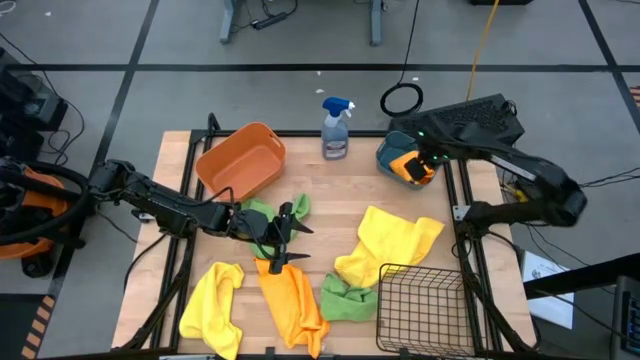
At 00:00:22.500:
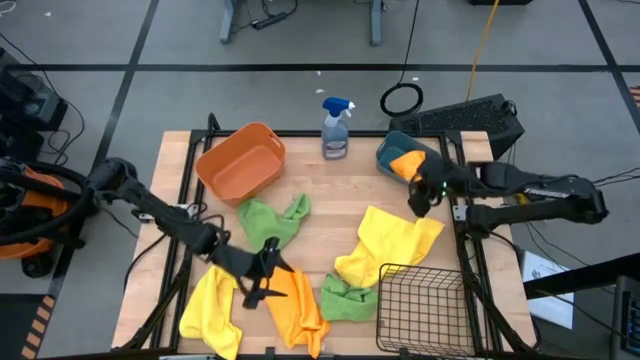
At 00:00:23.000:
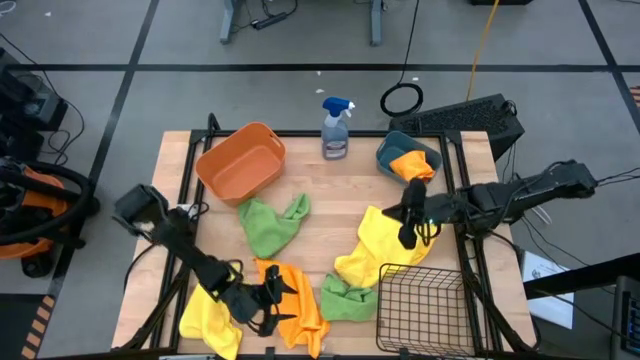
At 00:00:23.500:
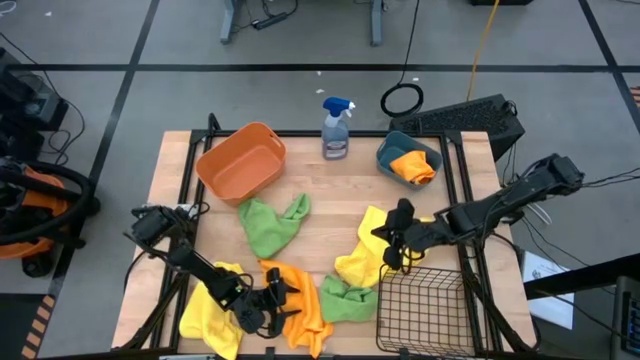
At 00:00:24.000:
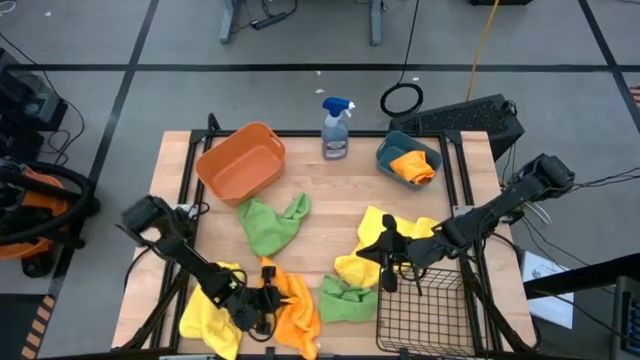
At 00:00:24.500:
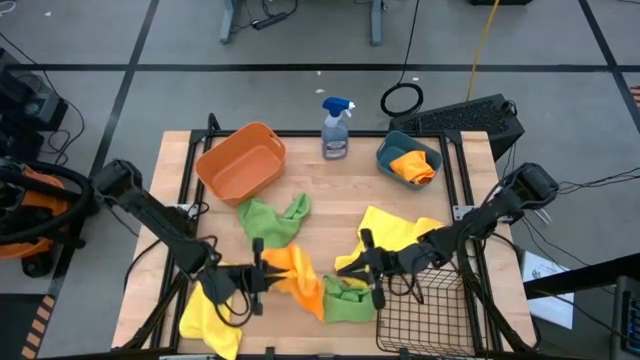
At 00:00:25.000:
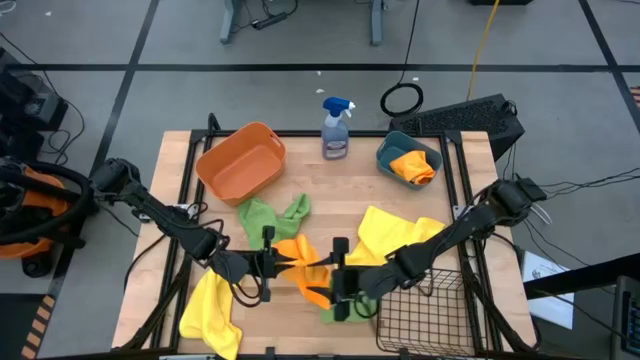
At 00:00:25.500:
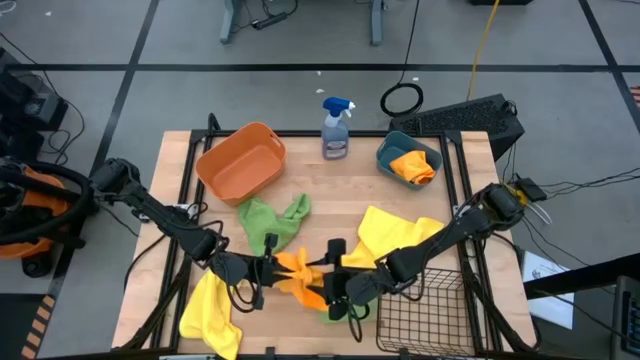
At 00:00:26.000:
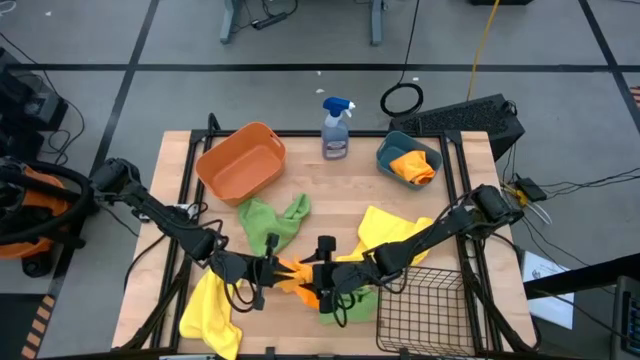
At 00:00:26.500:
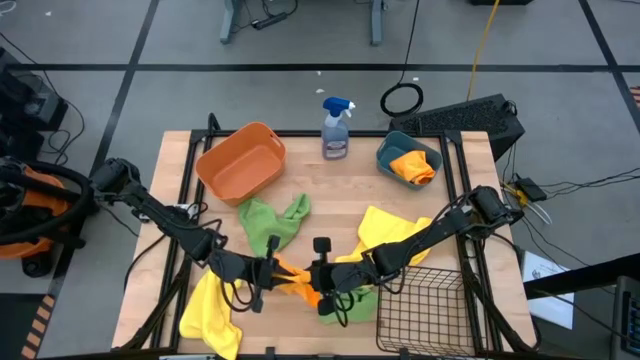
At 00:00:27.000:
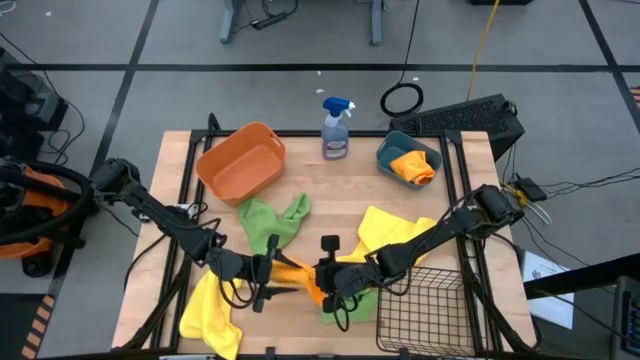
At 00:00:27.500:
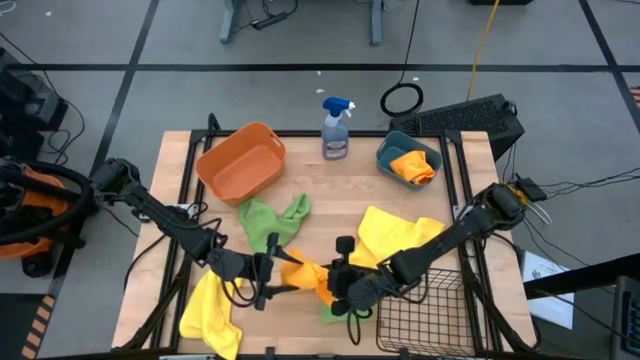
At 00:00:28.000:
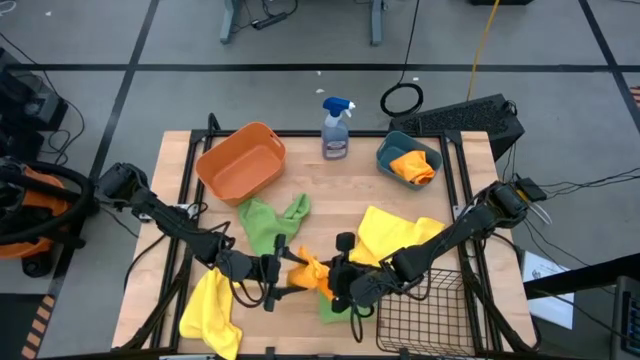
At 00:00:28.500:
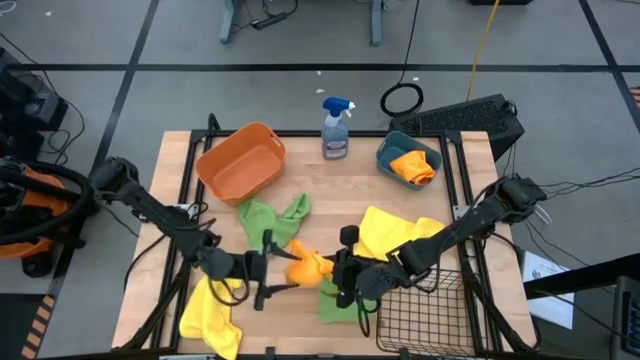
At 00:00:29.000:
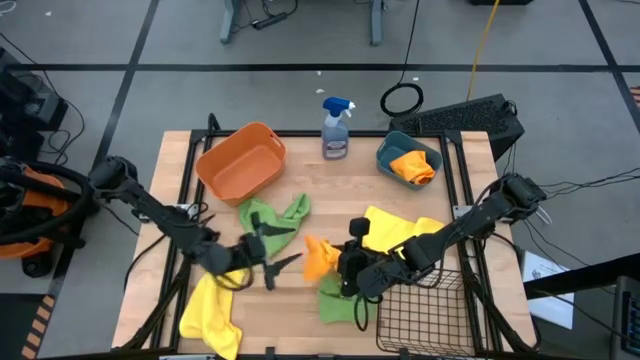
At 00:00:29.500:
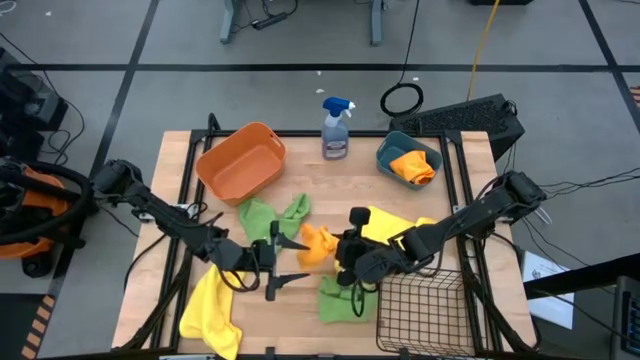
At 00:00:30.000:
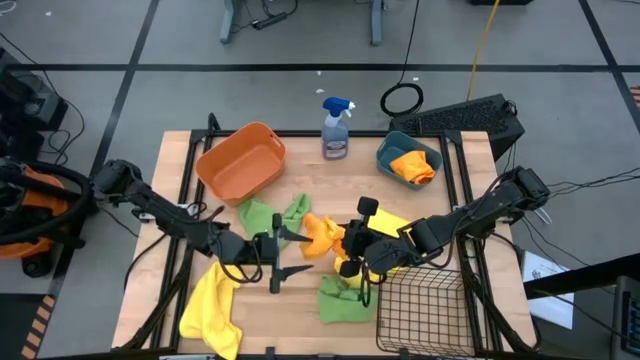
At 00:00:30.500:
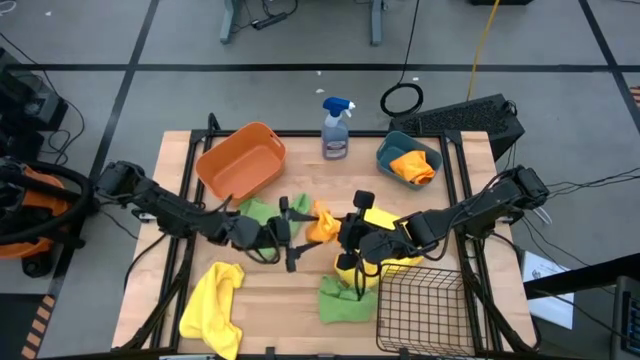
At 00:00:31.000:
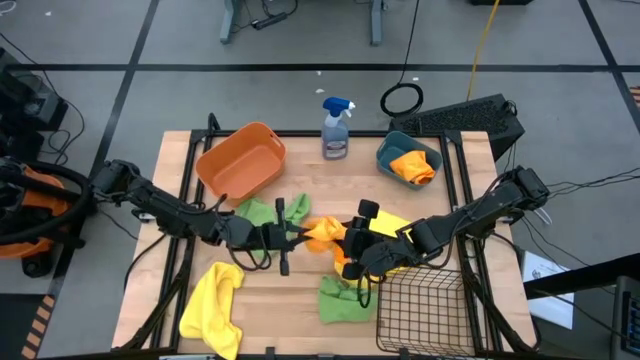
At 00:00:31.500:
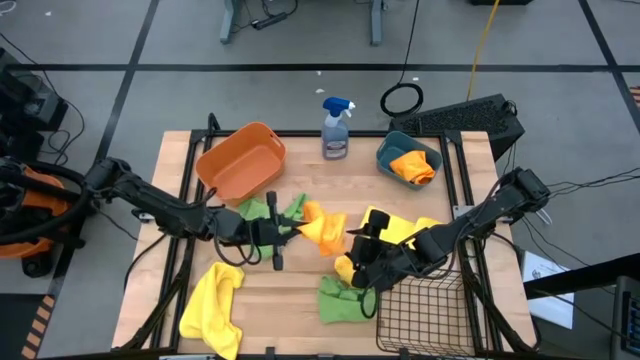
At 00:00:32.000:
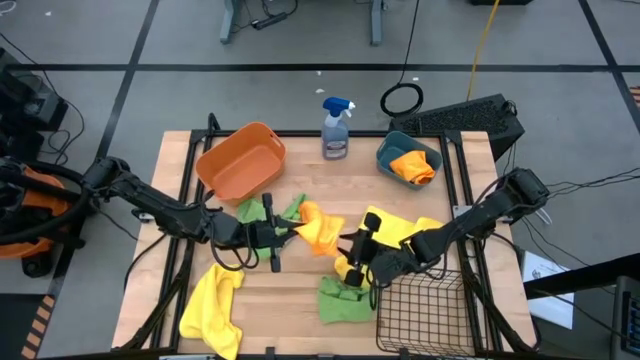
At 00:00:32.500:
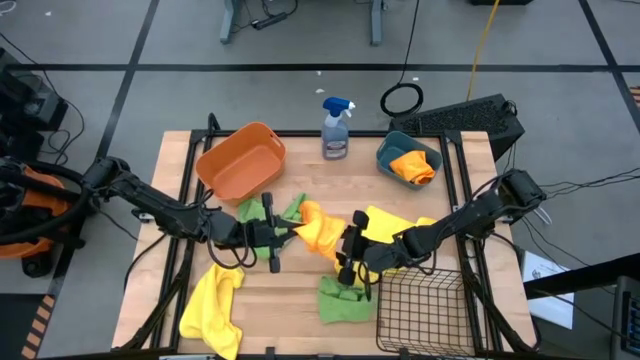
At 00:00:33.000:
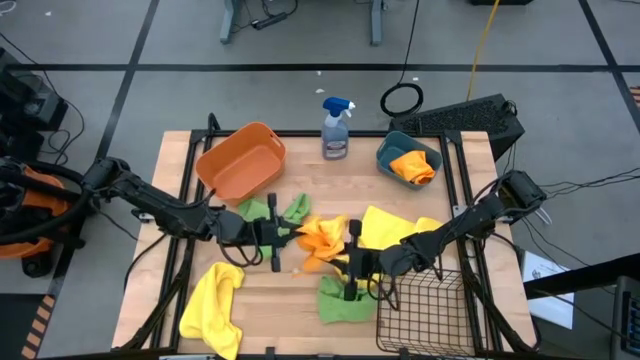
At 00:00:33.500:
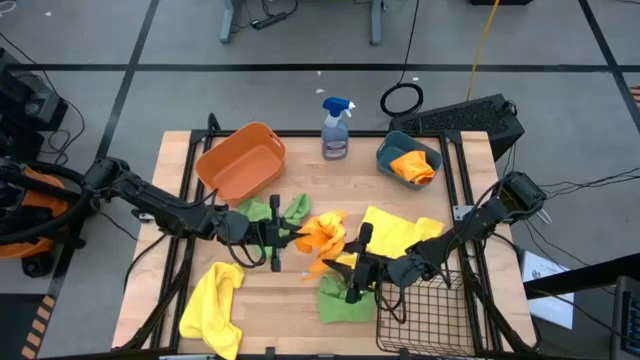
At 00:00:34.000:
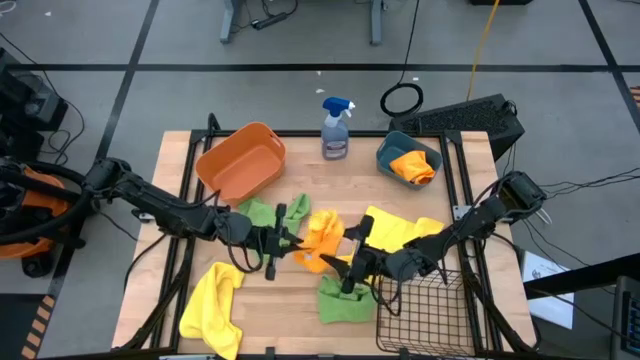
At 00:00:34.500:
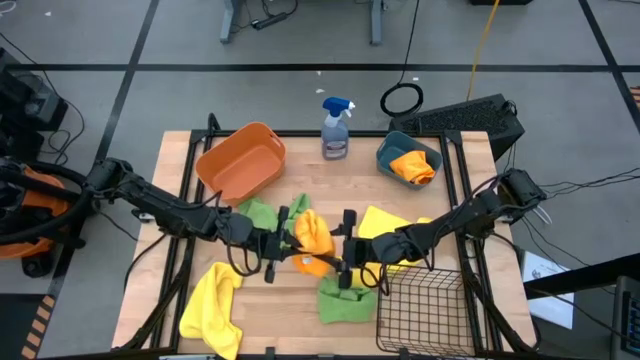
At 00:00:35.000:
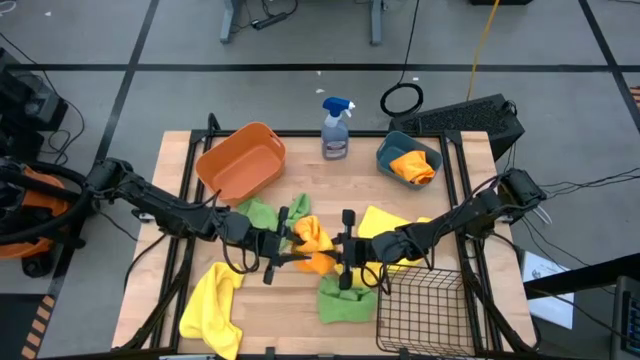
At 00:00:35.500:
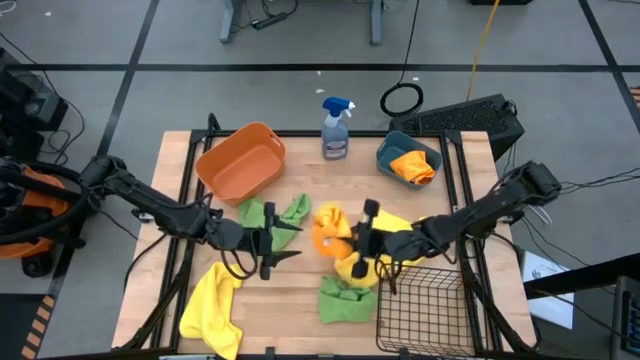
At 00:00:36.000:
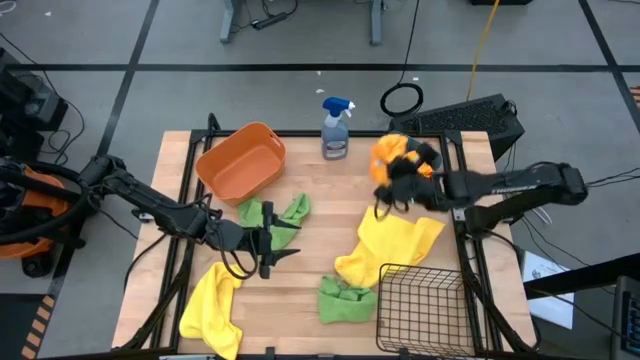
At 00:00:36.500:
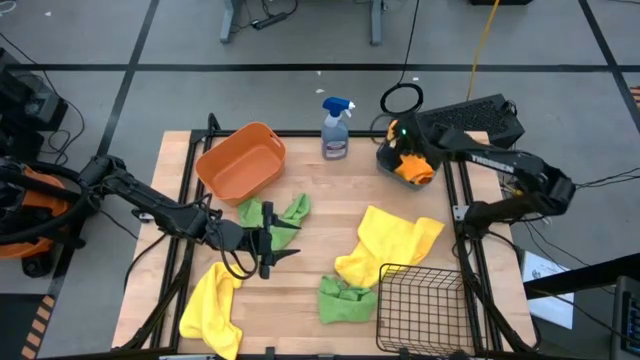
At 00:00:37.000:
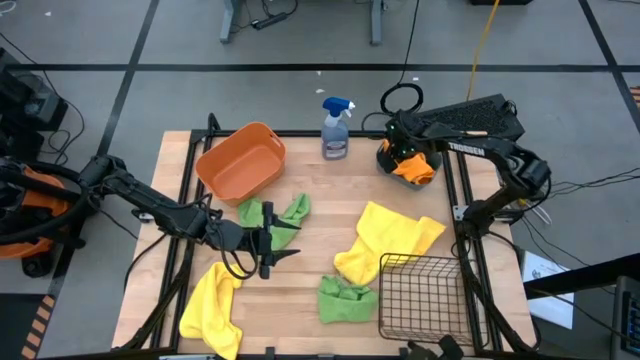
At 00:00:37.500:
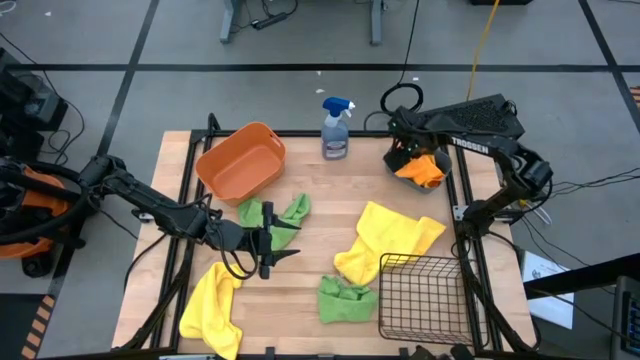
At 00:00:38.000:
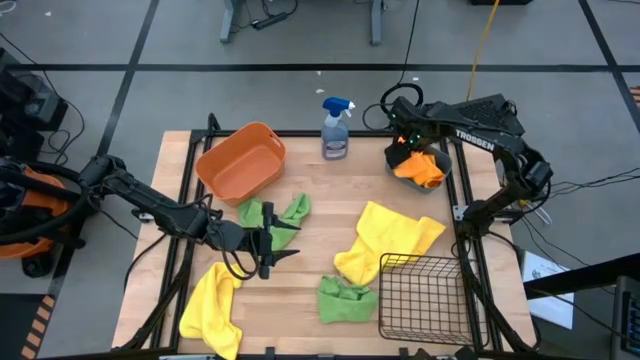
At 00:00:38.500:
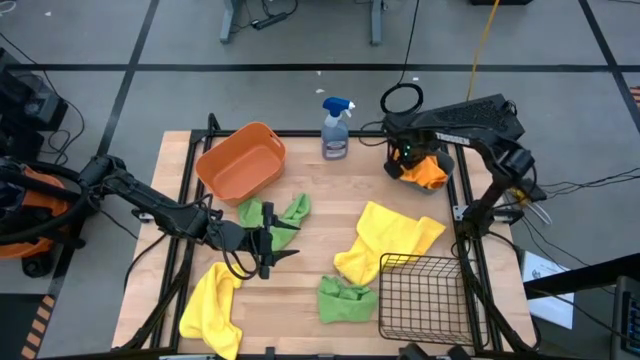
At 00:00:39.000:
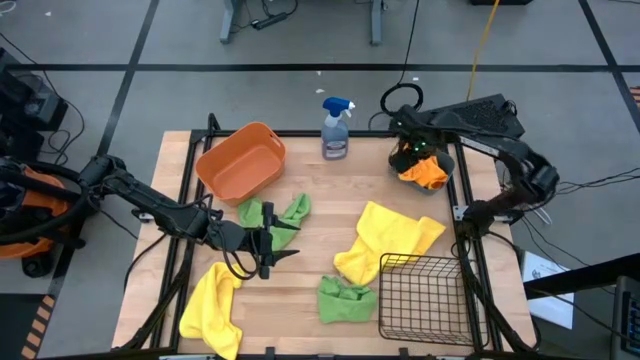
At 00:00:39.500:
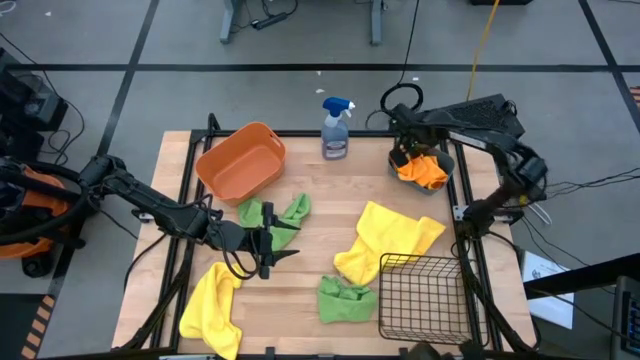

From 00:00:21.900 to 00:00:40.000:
Task: Sort microfiber towel by color & place in baskets
Put the orange microfiber towel into the blue bin
